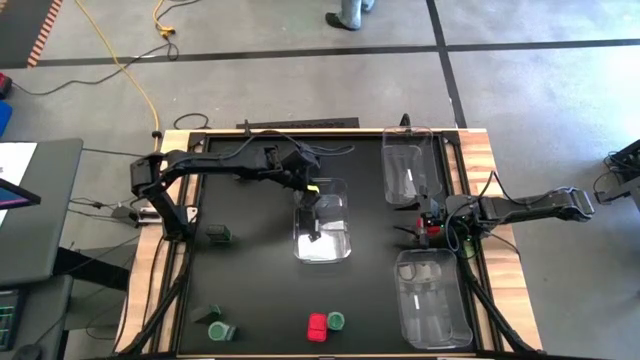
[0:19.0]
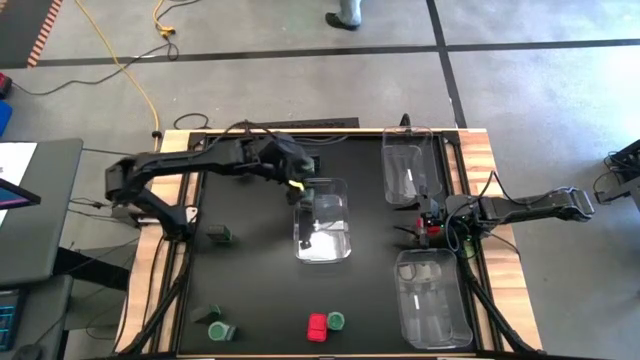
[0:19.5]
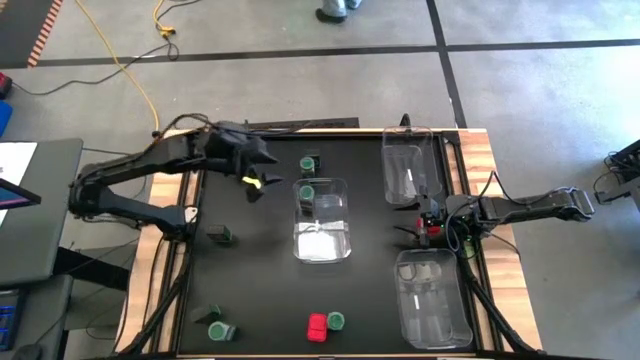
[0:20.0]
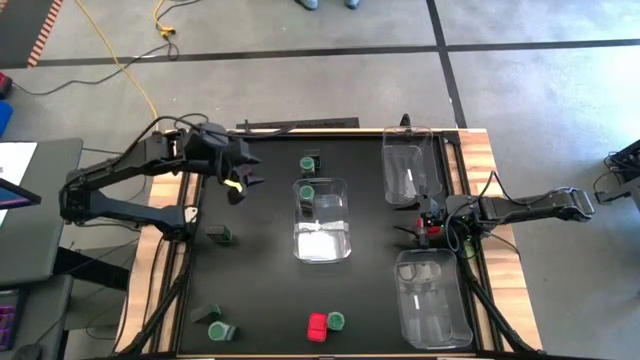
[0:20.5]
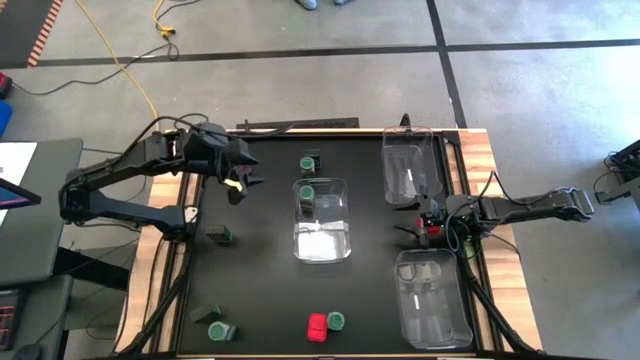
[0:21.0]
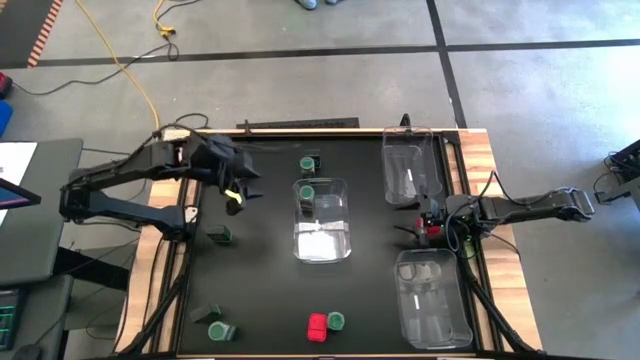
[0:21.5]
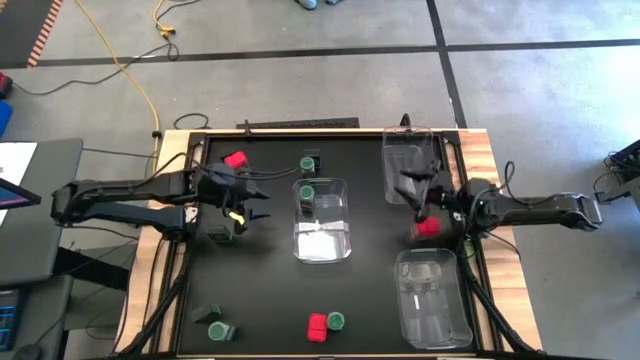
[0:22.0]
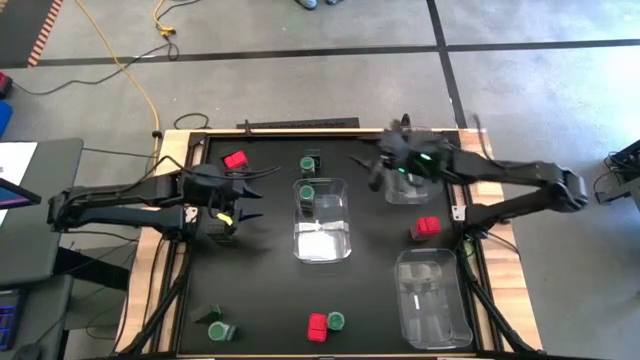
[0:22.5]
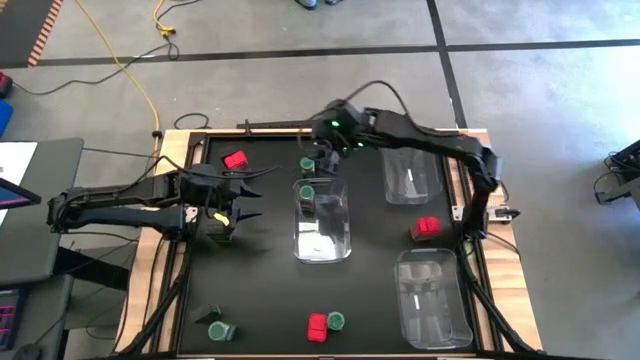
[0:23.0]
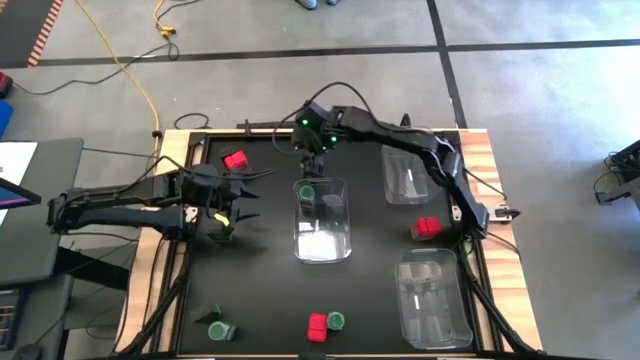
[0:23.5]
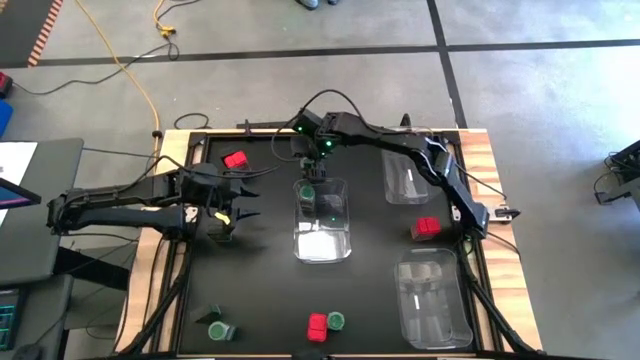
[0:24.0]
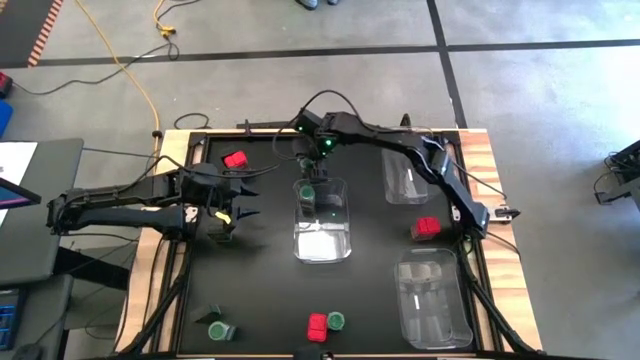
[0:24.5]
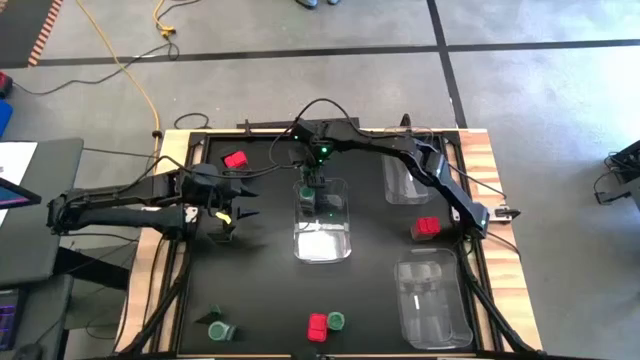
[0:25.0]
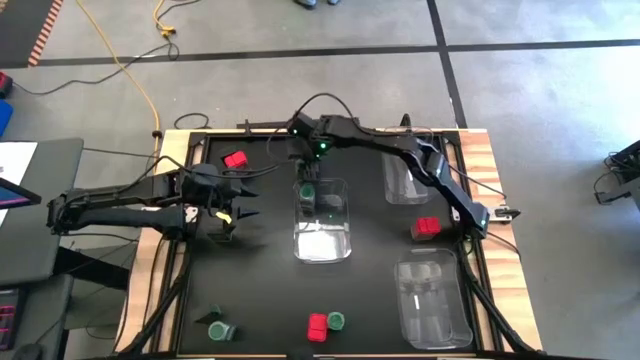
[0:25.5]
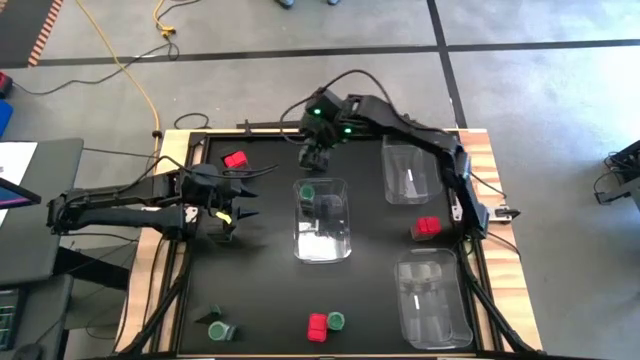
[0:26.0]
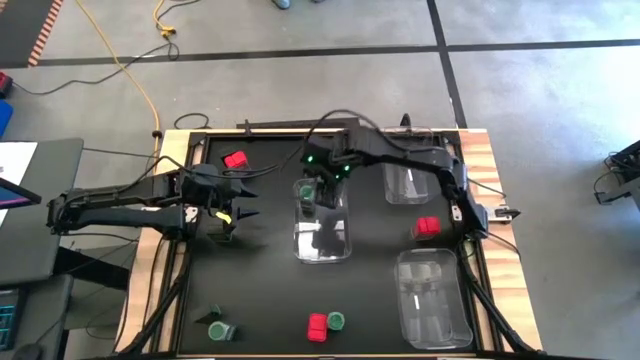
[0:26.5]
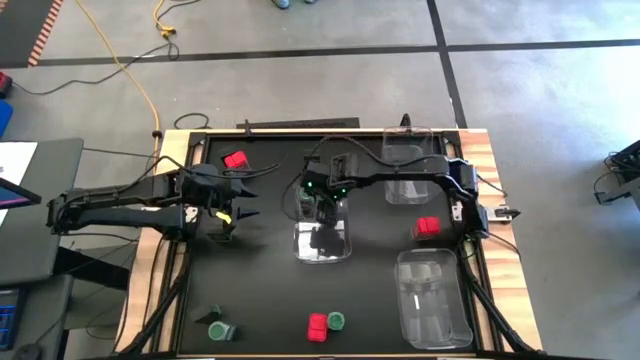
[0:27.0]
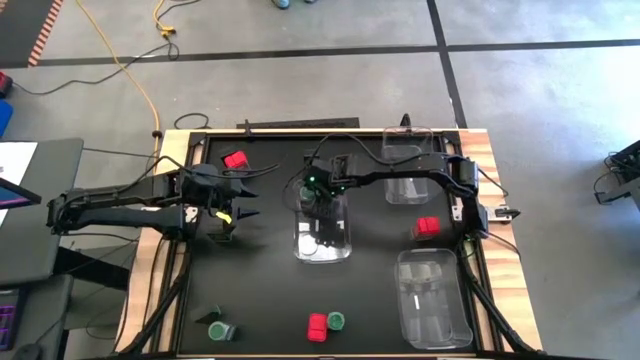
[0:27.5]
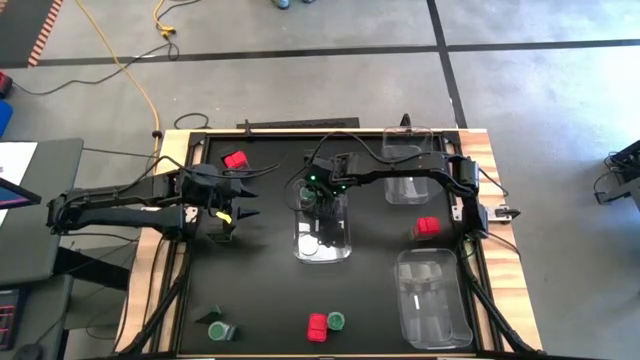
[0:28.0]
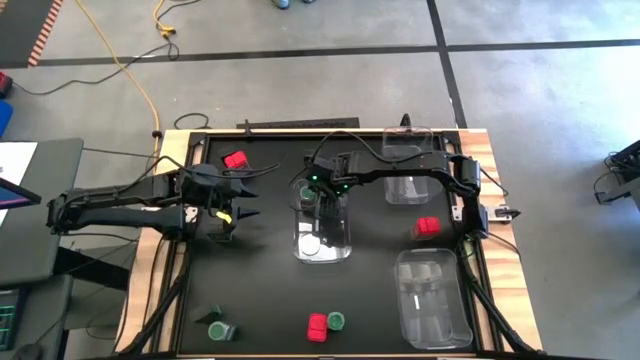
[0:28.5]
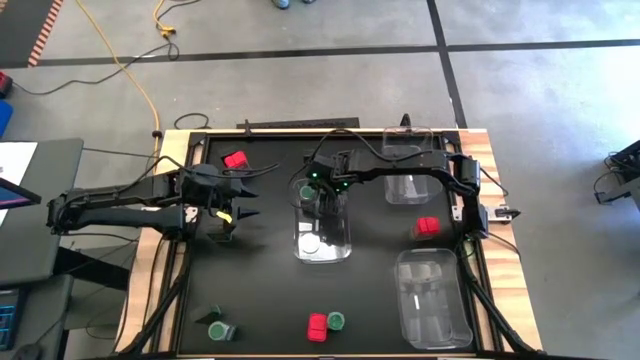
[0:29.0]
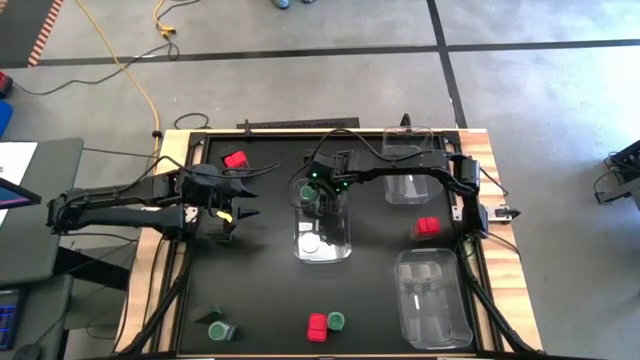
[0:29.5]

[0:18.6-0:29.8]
Task: Sort spices by type
Put the green seasoning bottle into the middle left transparent bin

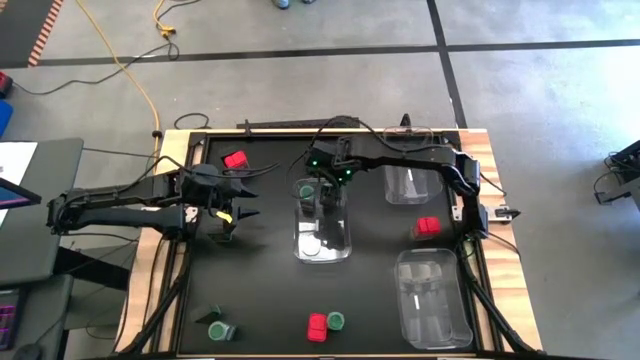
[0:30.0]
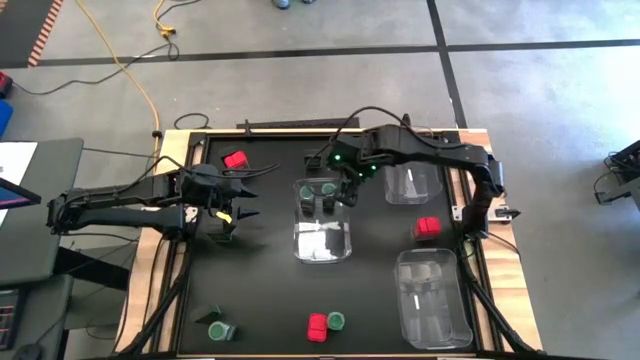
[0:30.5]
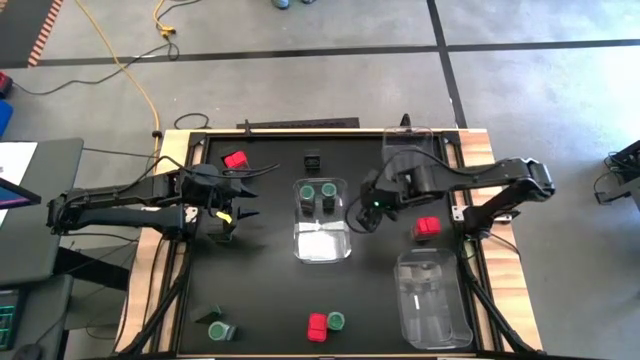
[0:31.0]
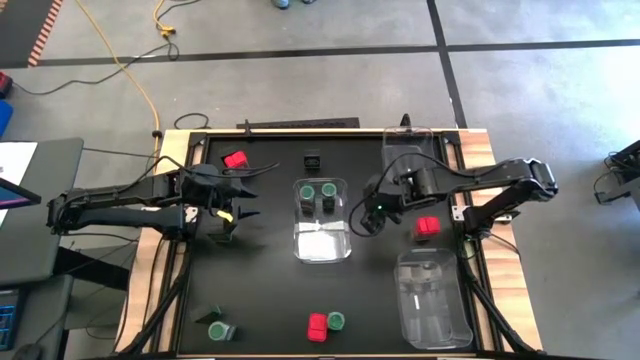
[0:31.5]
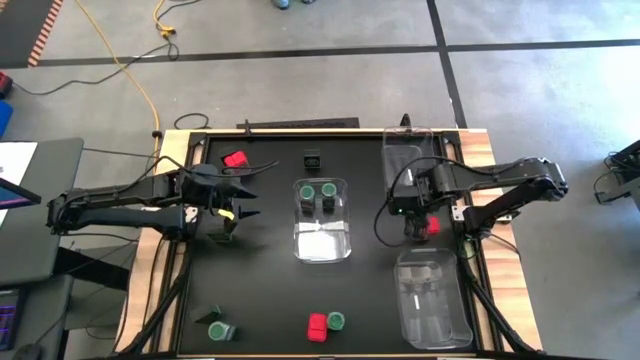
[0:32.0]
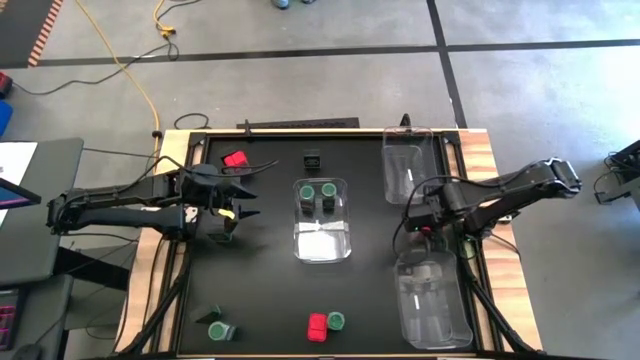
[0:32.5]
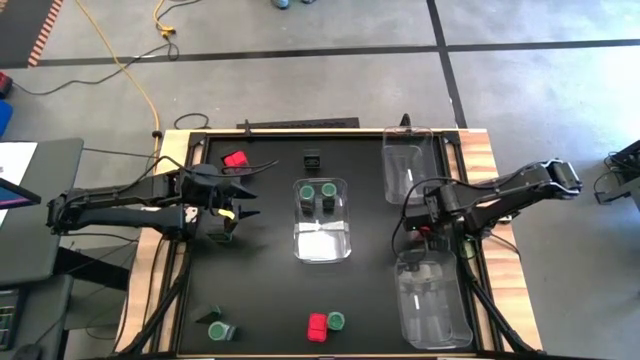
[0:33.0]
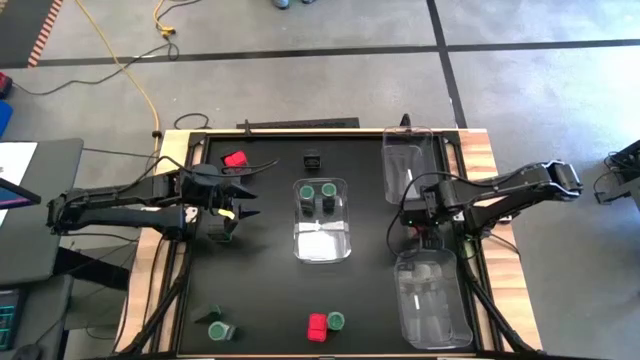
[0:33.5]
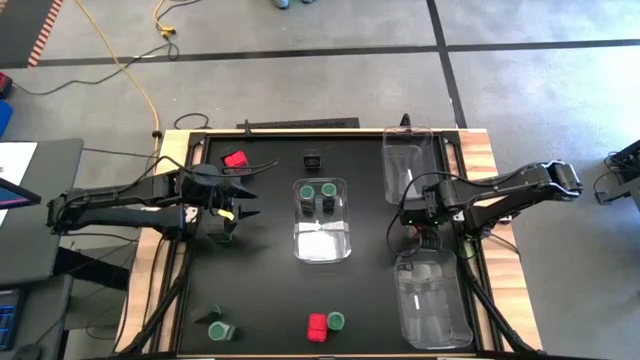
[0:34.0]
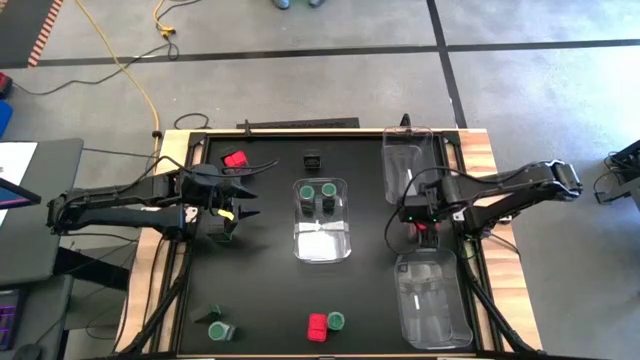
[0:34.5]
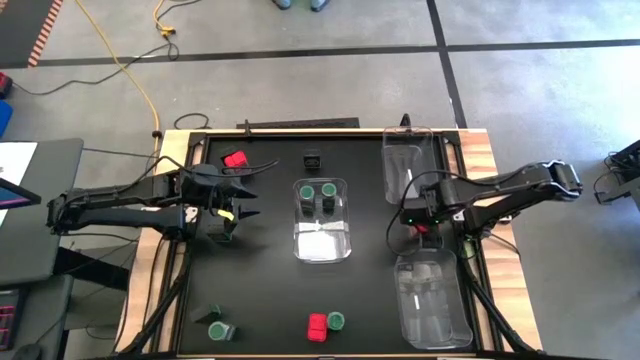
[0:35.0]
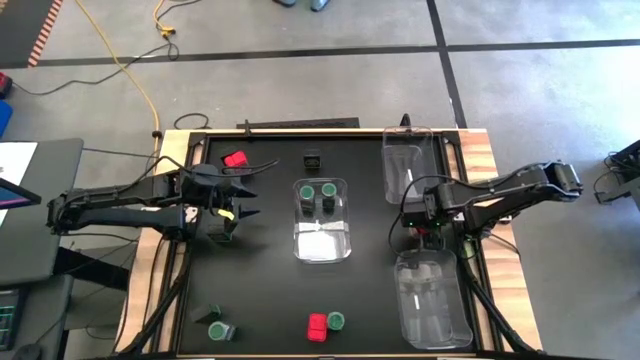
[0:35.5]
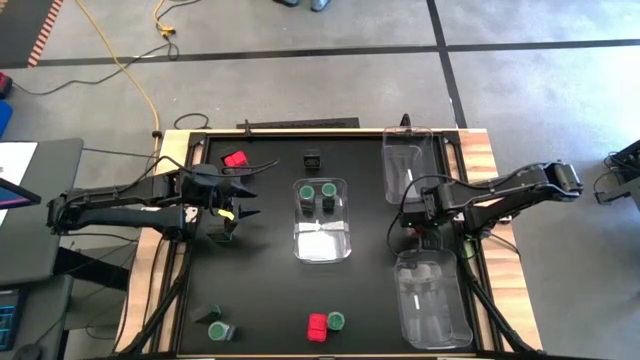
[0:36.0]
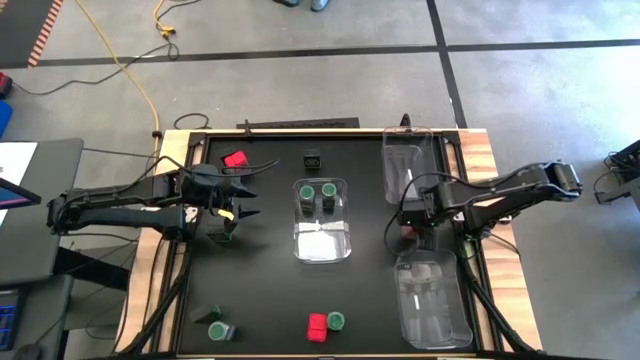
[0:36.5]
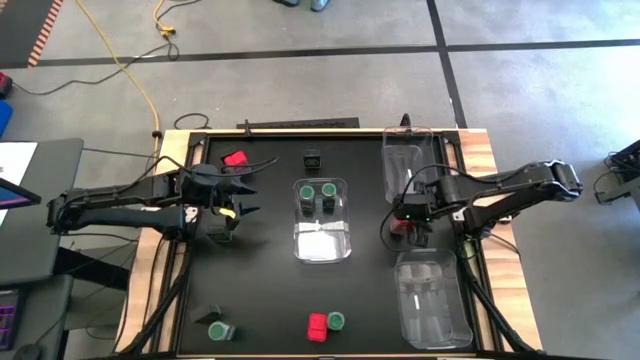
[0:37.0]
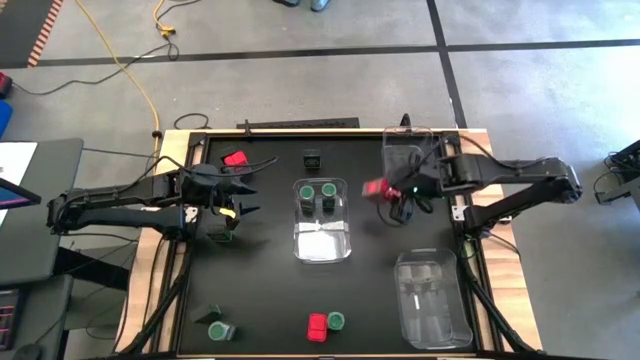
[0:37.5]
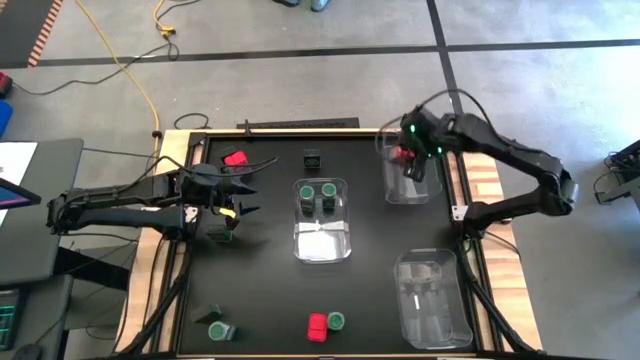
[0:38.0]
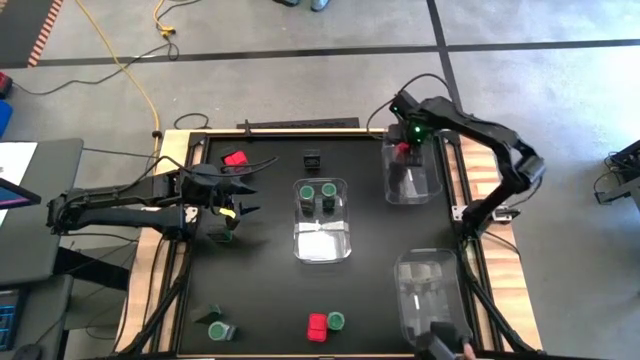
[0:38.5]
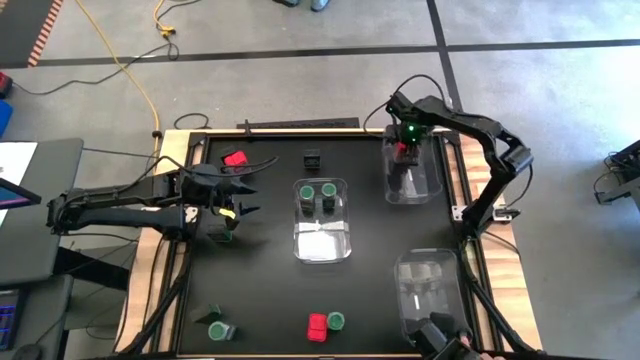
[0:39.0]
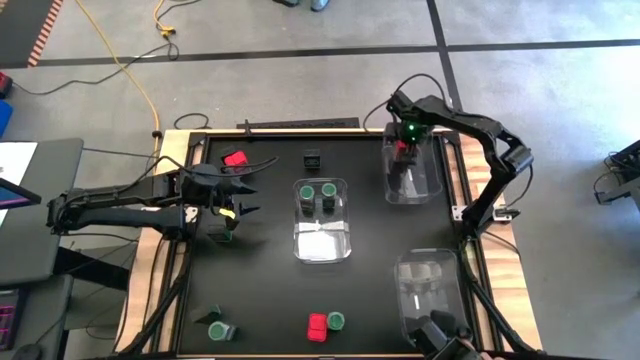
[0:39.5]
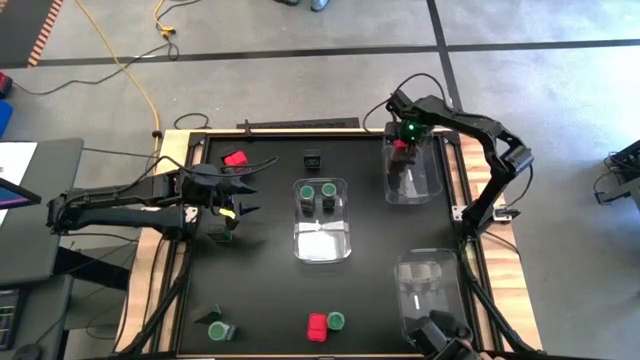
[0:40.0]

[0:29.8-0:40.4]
Put the red seasoning can into the top transparent bin
